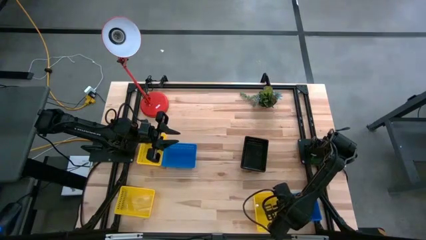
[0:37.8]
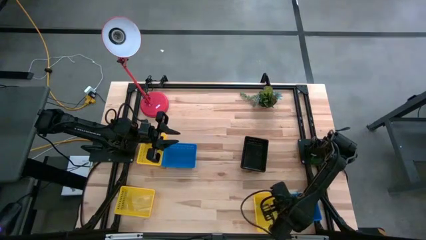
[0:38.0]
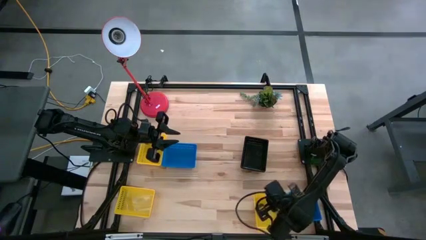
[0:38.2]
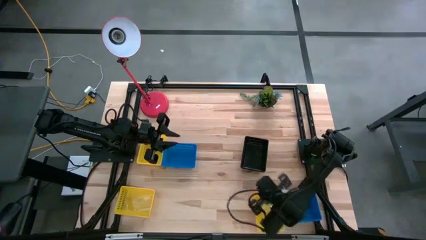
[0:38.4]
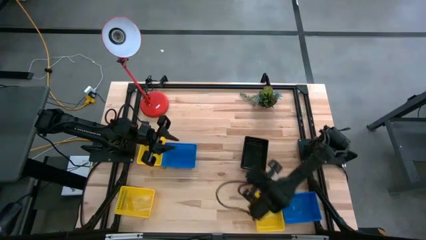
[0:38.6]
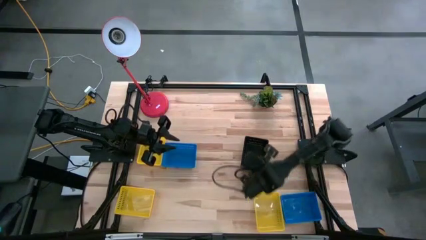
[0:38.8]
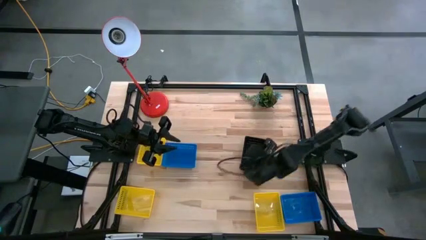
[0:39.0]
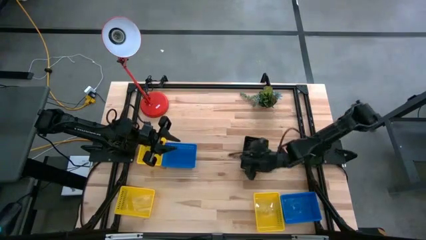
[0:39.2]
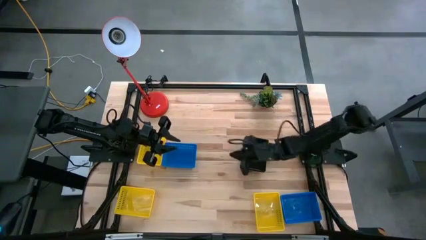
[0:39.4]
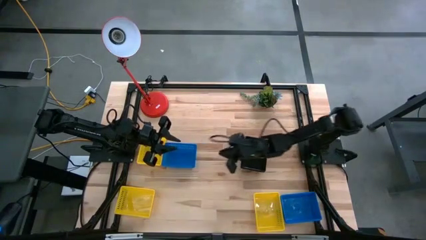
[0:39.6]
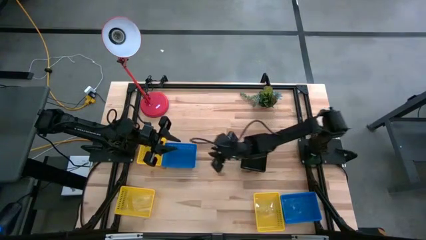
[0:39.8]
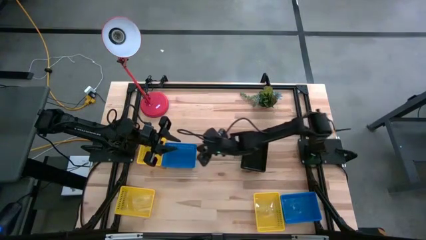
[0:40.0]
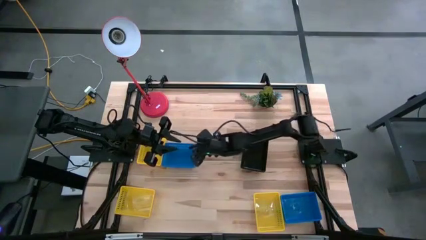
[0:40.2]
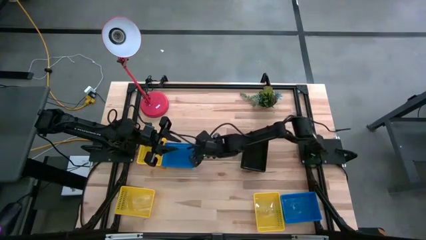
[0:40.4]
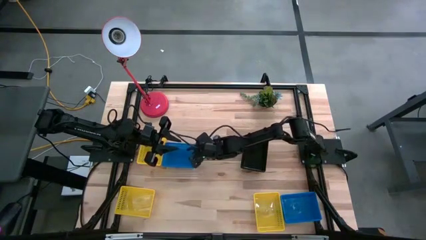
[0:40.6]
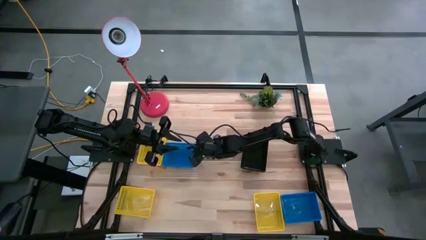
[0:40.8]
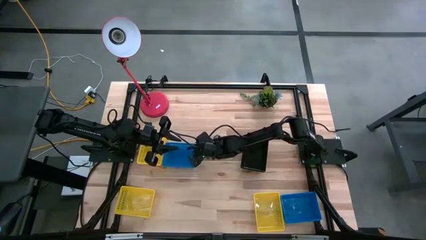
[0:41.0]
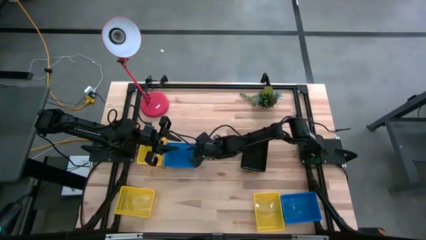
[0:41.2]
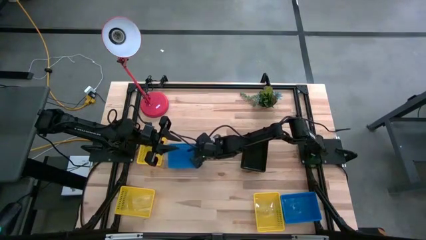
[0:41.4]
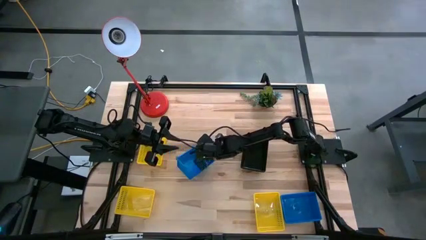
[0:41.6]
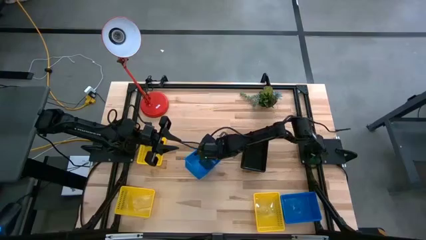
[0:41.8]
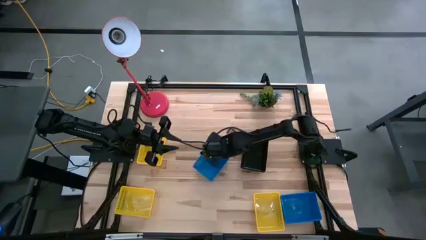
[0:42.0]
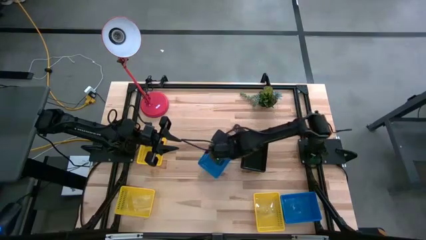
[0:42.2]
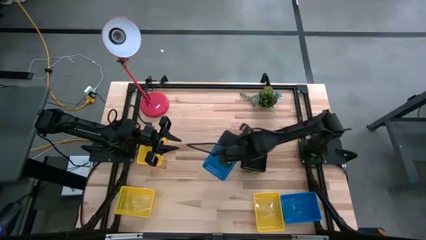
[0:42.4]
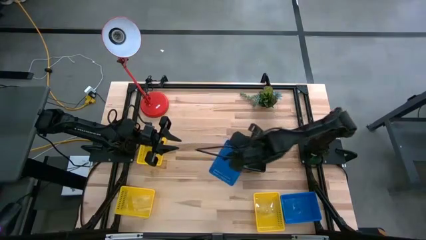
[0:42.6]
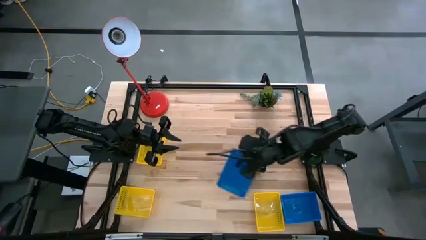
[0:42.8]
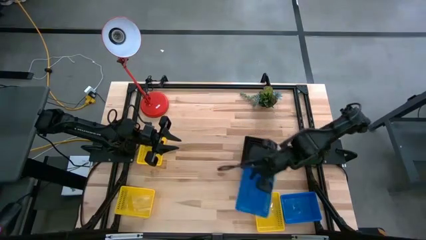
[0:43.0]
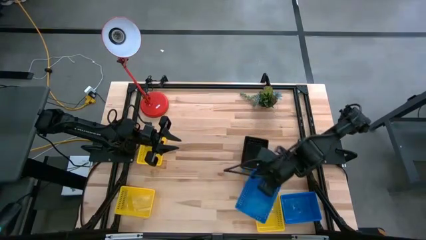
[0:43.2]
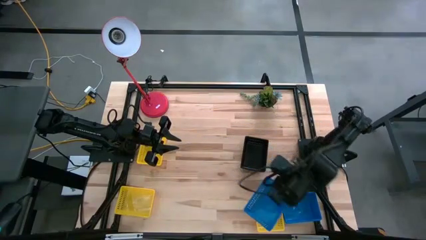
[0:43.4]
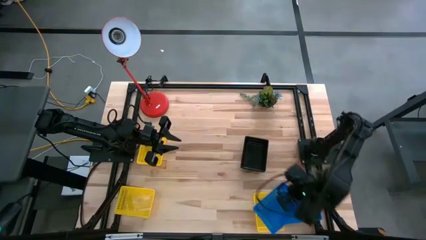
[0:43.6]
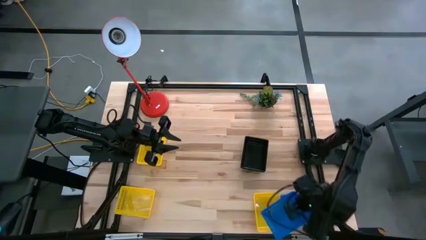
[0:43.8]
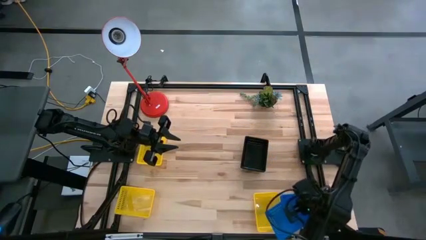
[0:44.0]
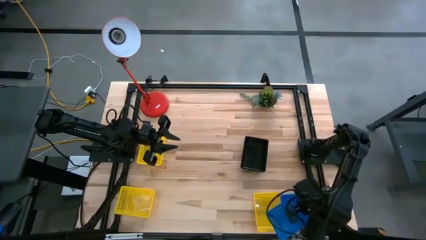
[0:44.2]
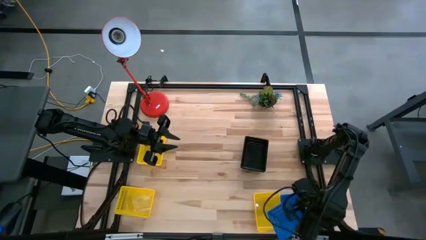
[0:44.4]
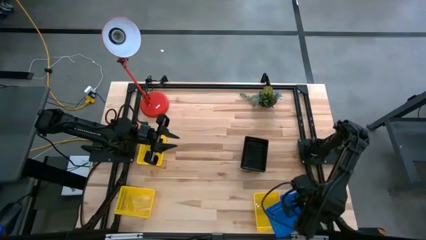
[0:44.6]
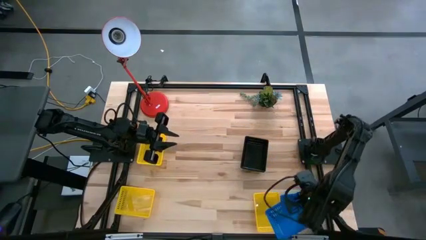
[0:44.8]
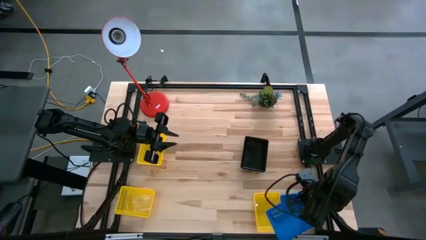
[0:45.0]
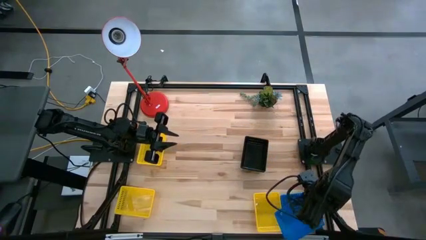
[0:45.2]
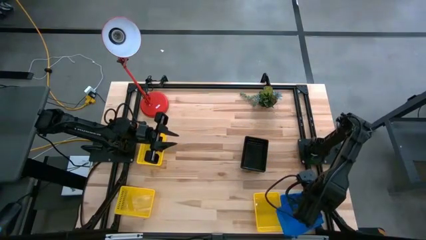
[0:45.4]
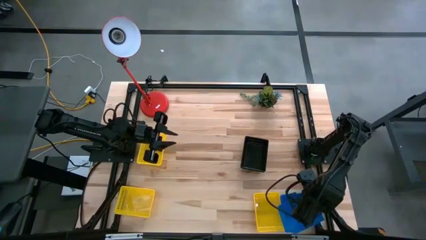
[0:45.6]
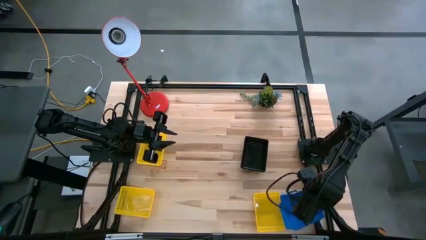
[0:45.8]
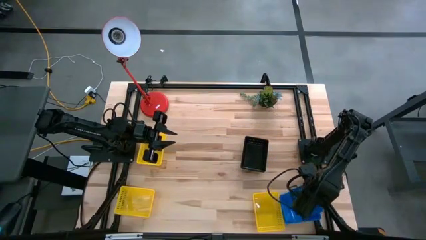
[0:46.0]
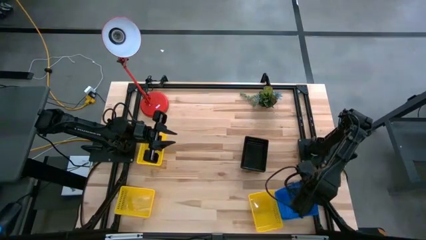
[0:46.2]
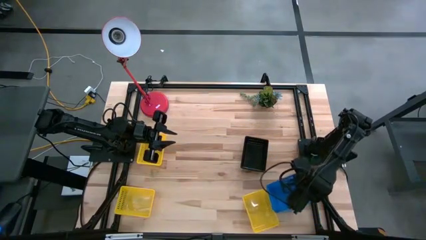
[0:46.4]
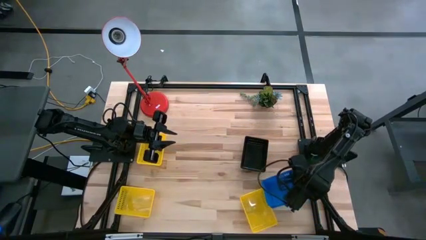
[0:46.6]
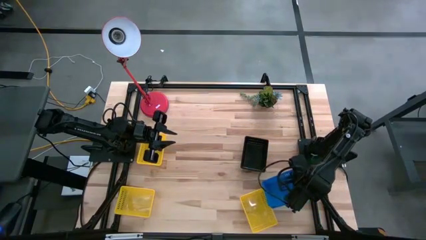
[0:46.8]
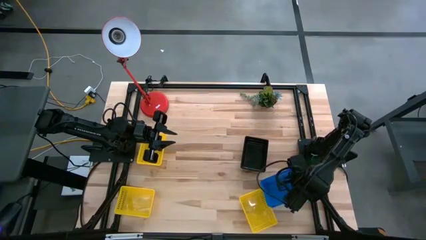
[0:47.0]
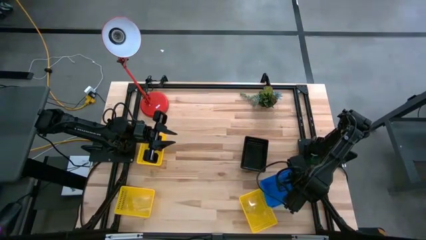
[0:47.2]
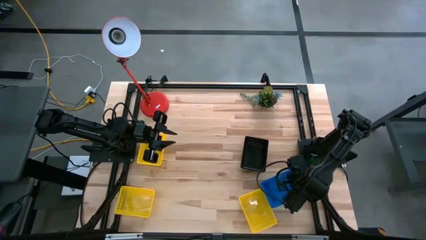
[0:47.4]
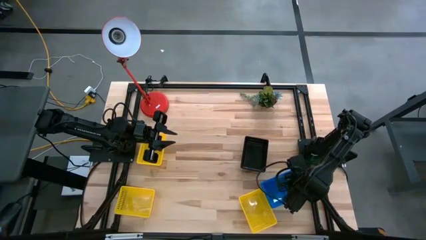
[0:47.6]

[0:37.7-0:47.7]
Stack the top blue basket on the bottom blue basket
